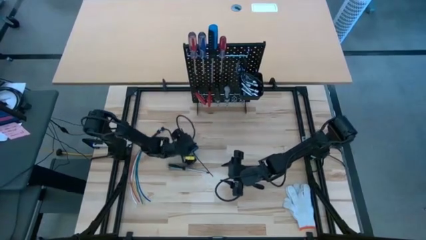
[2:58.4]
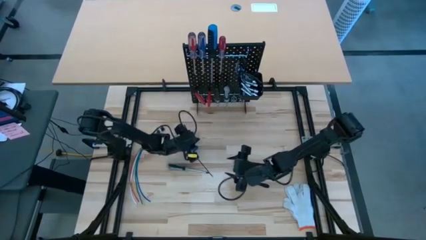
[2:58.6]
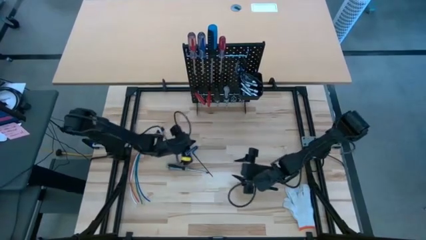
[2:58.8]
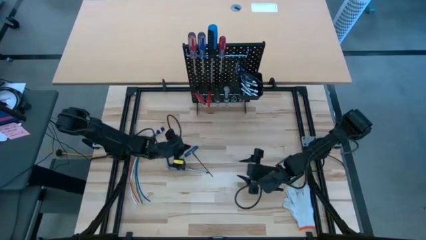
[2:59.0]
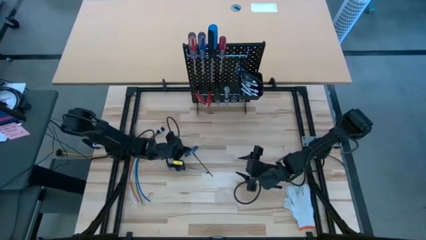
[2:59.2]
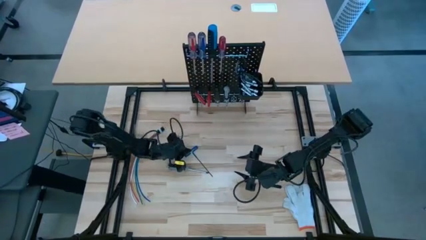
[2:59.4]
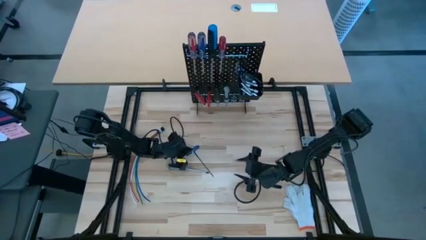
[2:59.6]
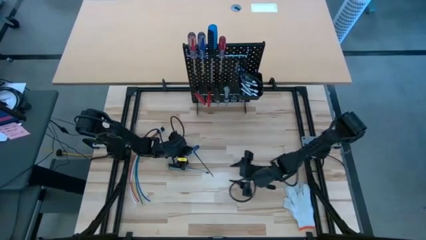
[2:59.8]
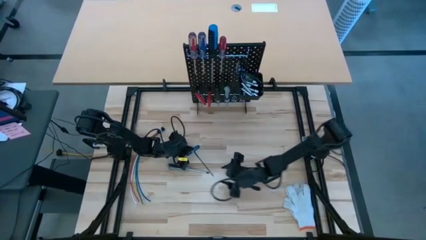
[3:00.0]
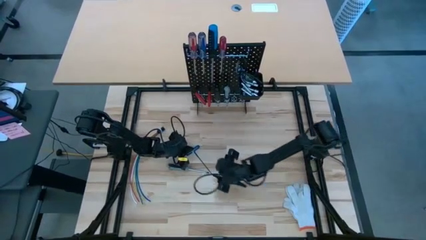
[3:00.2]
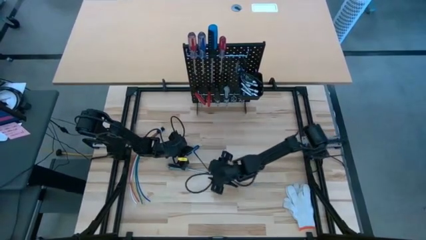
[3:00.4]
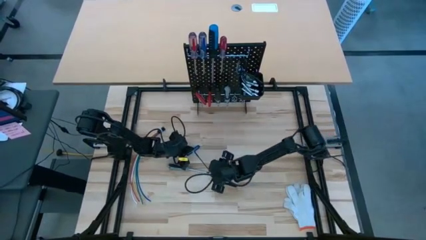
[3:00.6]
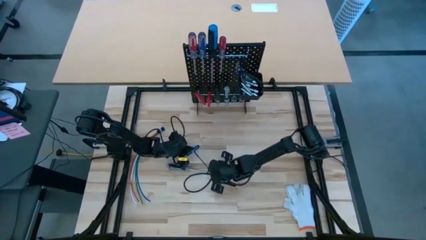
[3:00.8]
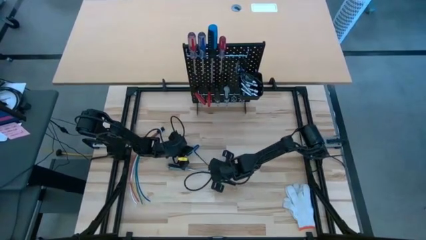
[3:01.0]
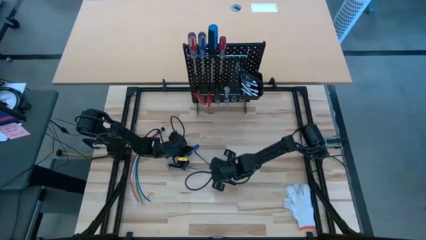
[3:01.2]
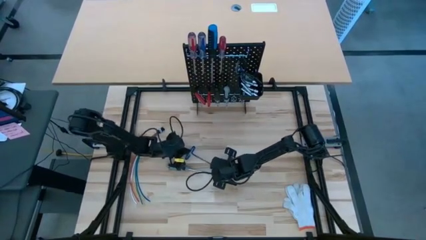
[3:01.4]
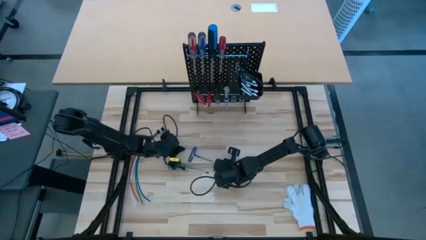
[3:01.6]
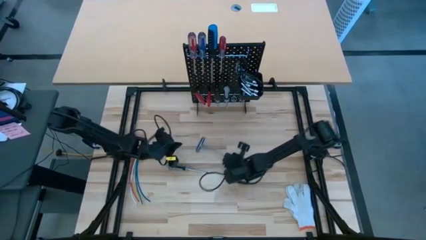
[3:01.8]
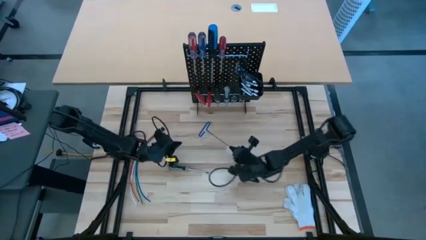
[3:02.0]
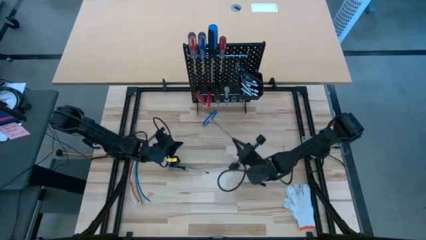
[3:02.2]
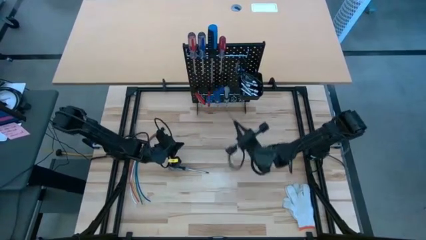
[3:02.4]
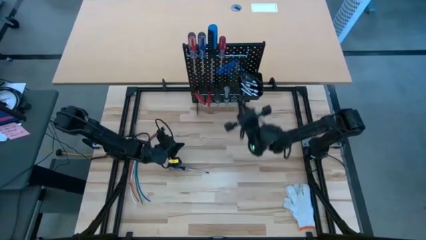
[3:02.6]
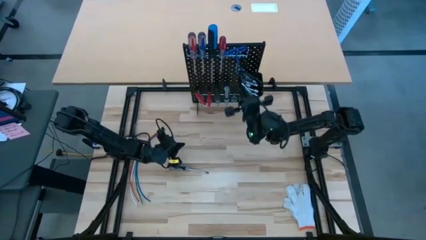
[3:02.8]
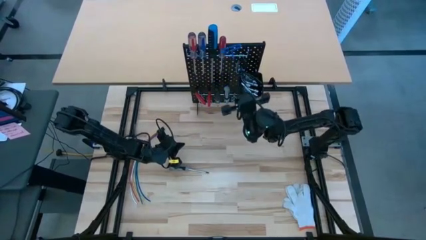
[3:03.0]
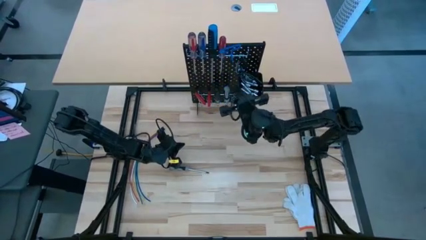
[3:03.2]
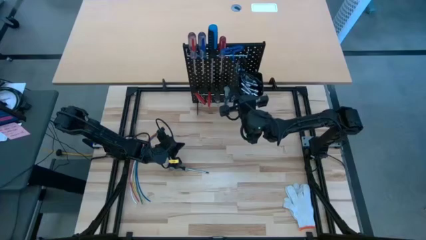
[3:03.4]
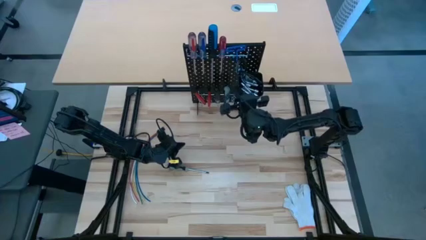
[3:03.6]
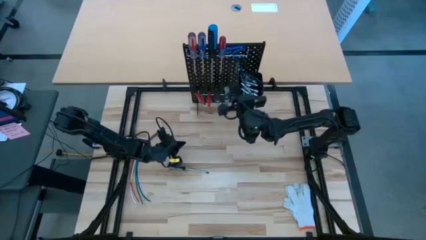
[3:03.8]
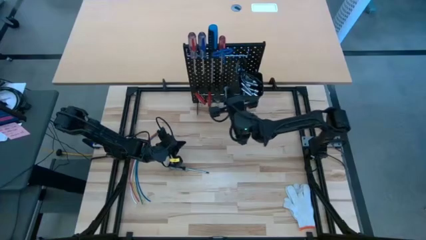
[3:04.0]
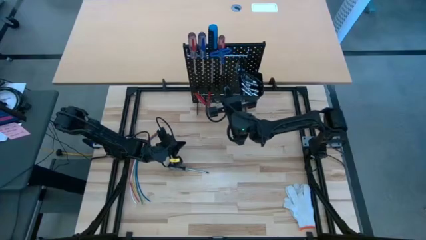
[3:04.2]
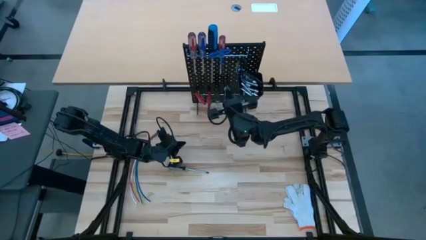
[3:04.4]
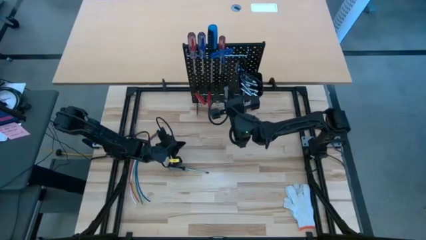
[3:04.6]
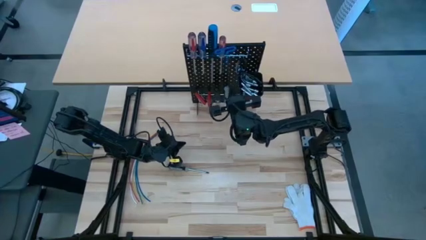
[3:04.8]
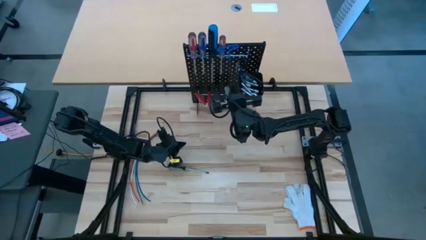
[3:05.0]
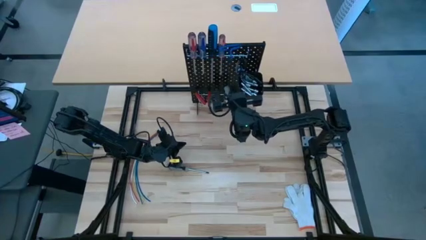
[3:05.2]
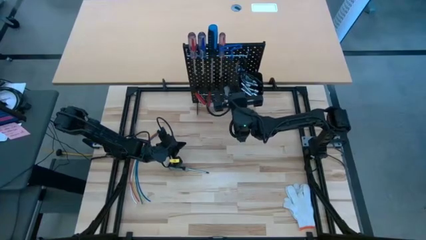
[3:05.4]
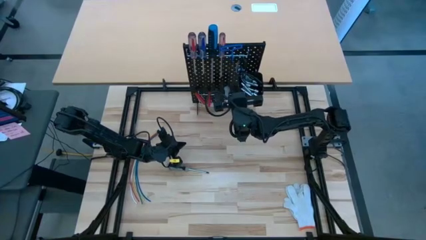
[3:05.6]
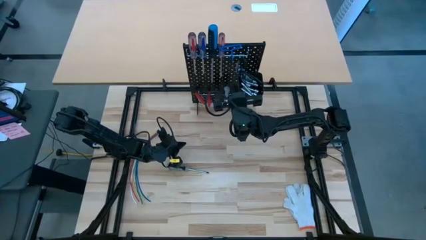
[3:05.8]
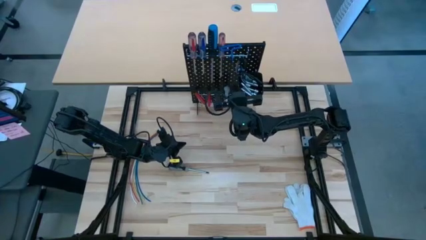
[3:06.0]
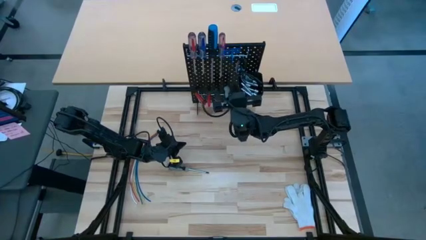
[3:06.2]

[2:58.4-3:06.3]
Task: Hang tools onto peg board
Hang the pick tool on the pegboard

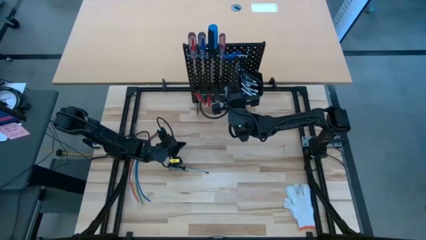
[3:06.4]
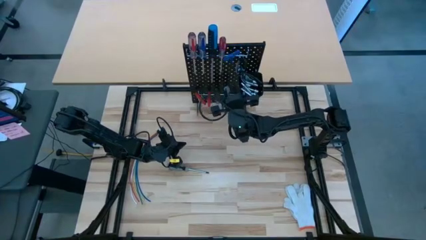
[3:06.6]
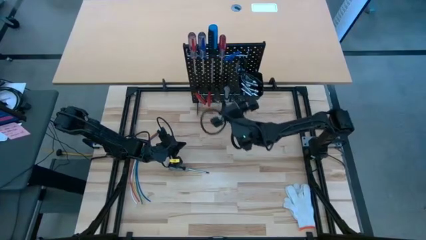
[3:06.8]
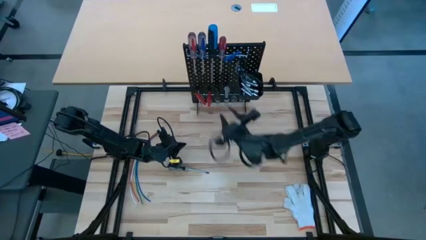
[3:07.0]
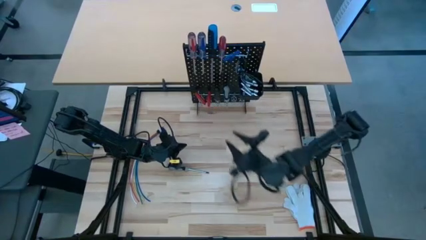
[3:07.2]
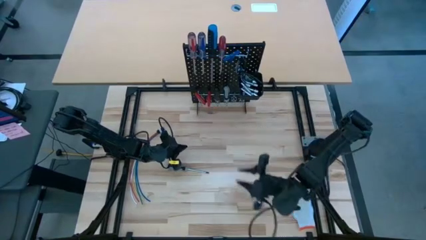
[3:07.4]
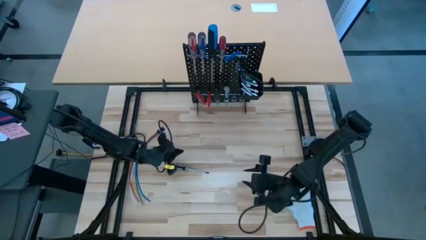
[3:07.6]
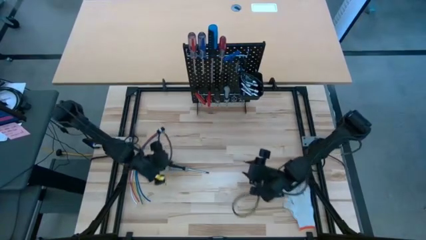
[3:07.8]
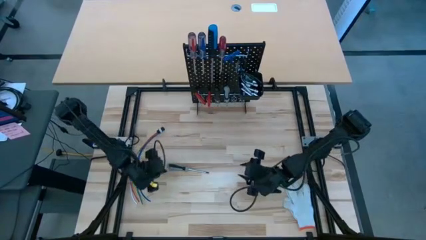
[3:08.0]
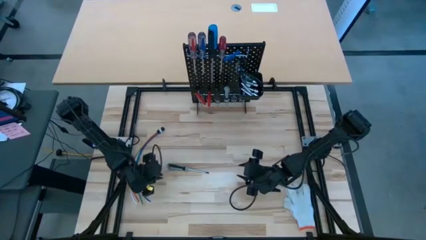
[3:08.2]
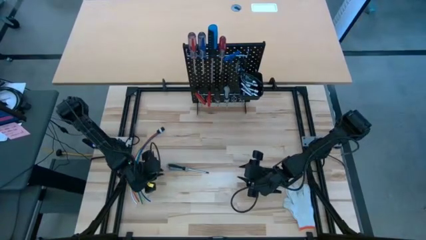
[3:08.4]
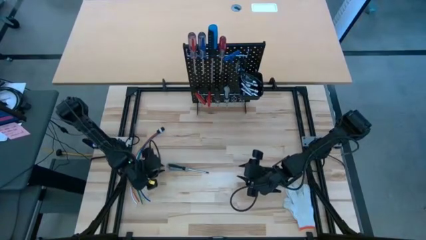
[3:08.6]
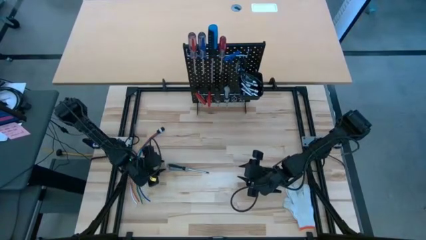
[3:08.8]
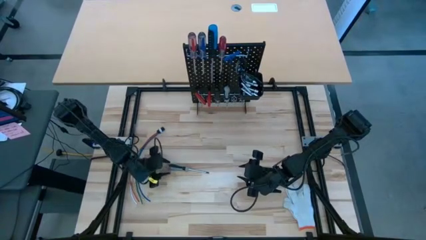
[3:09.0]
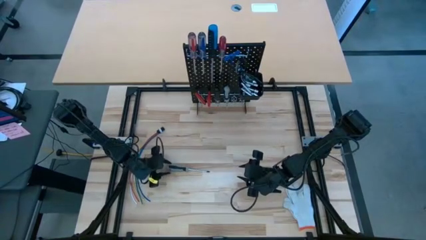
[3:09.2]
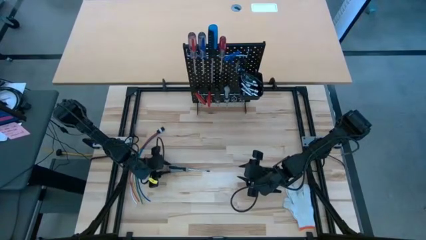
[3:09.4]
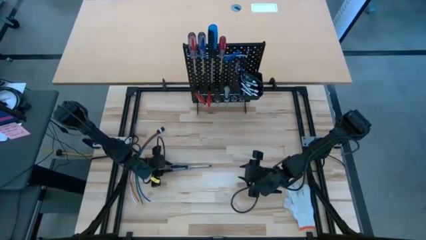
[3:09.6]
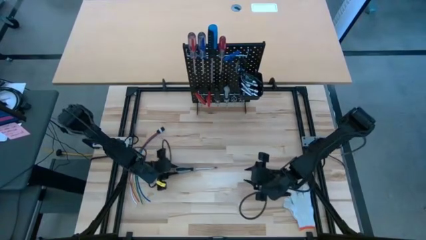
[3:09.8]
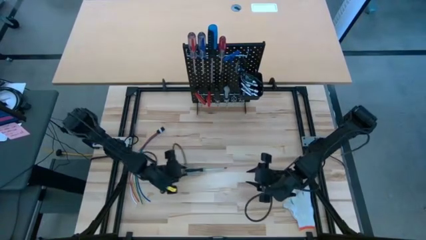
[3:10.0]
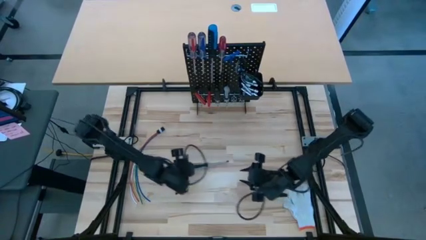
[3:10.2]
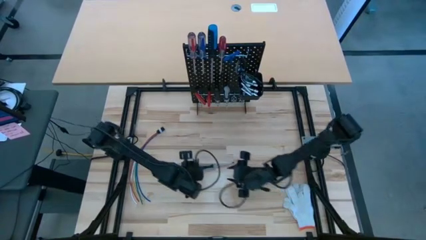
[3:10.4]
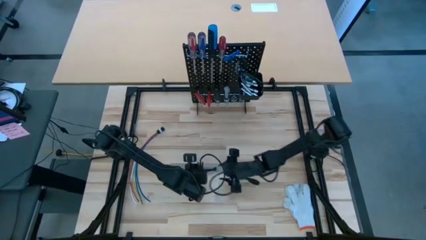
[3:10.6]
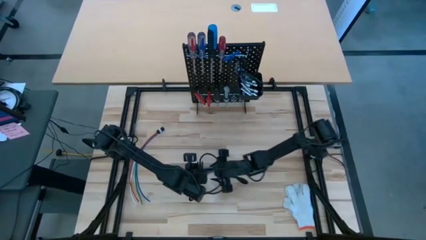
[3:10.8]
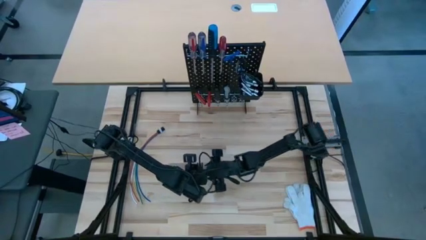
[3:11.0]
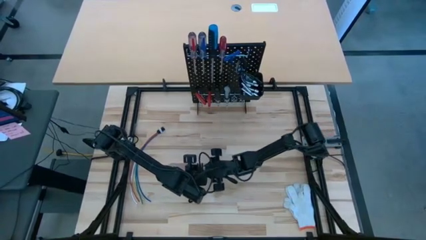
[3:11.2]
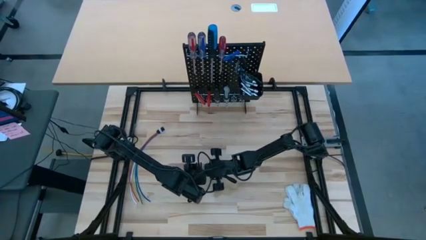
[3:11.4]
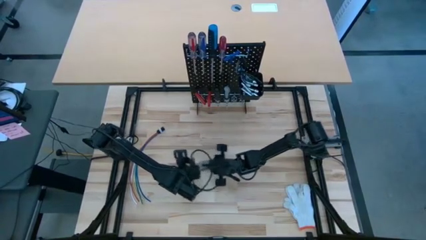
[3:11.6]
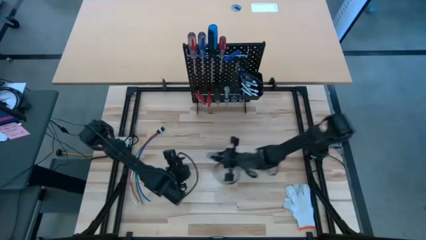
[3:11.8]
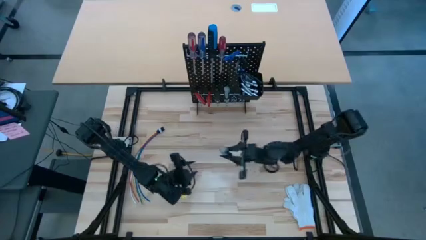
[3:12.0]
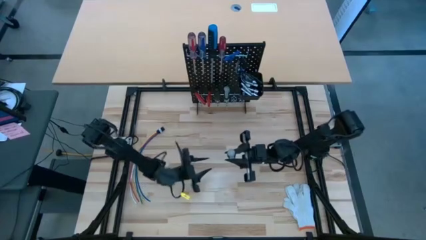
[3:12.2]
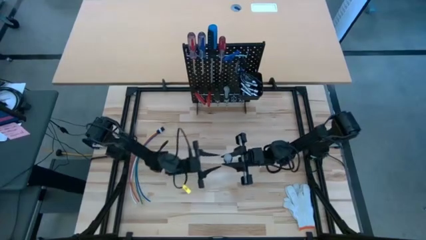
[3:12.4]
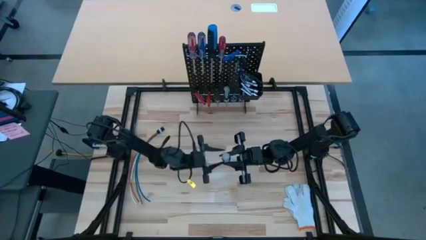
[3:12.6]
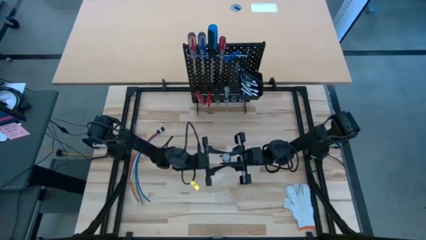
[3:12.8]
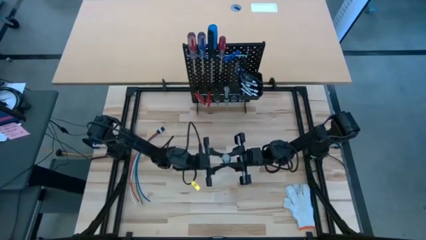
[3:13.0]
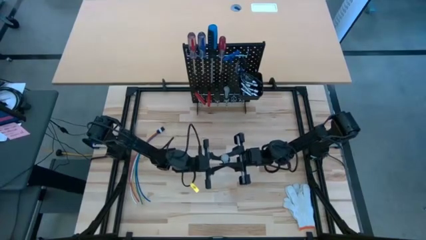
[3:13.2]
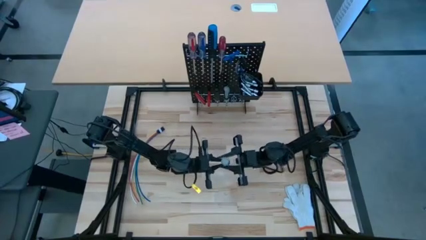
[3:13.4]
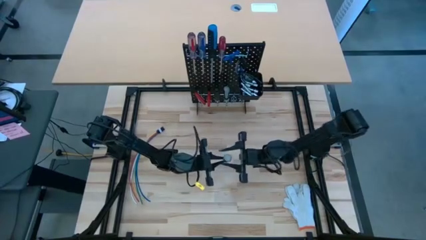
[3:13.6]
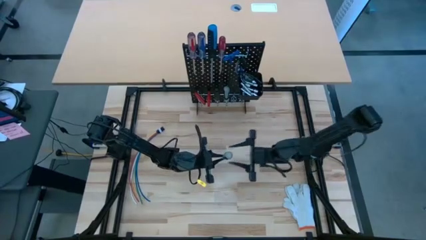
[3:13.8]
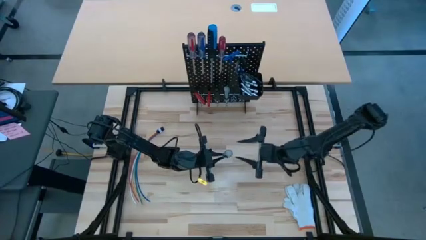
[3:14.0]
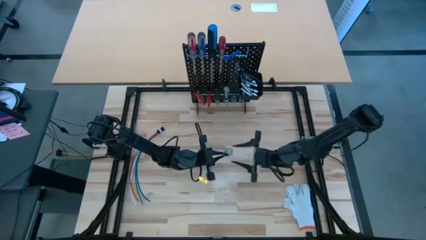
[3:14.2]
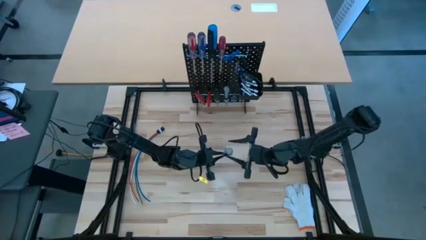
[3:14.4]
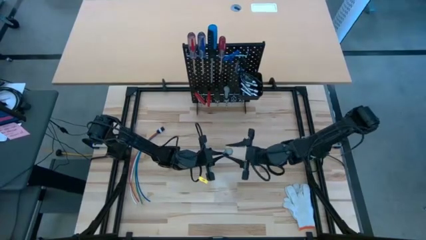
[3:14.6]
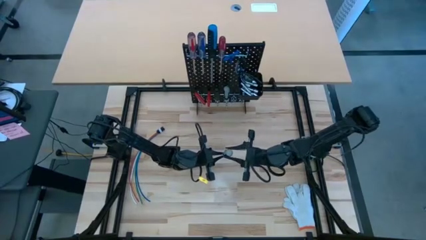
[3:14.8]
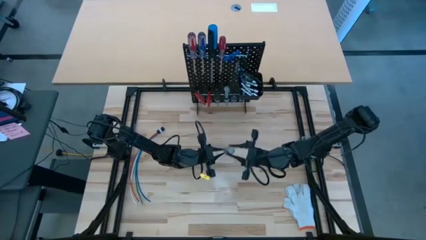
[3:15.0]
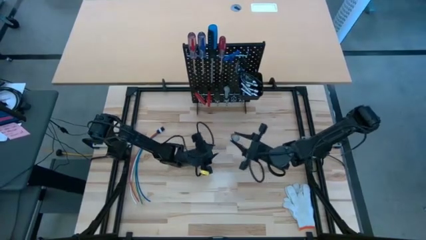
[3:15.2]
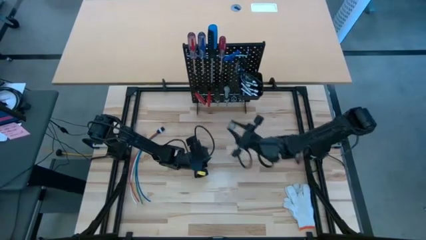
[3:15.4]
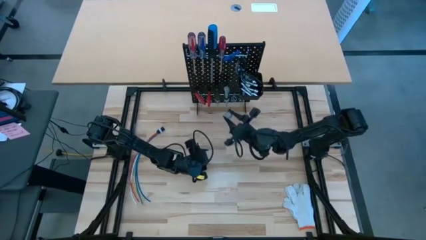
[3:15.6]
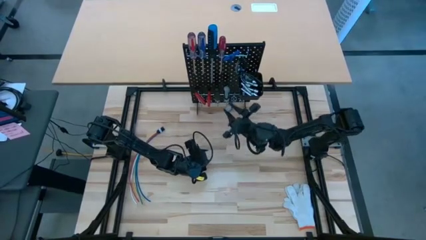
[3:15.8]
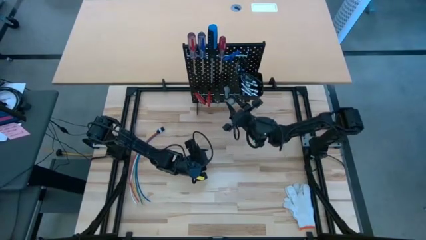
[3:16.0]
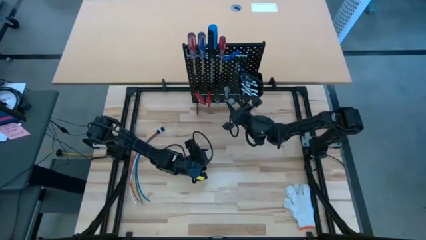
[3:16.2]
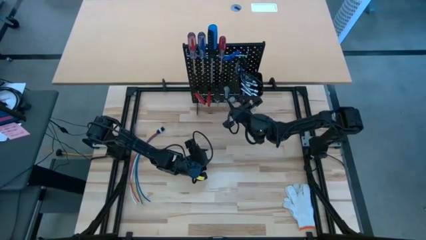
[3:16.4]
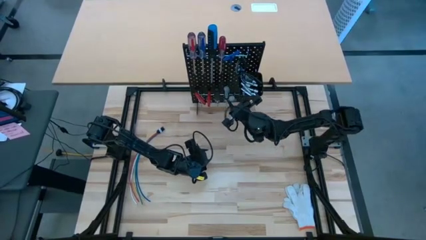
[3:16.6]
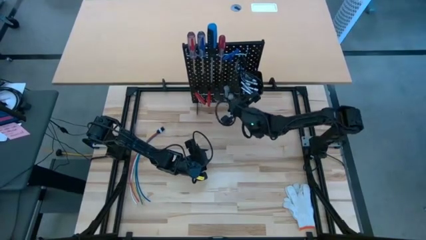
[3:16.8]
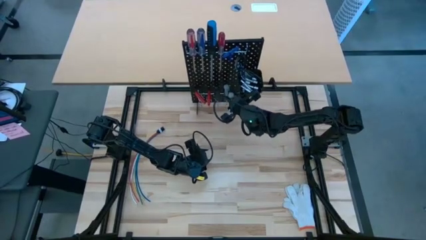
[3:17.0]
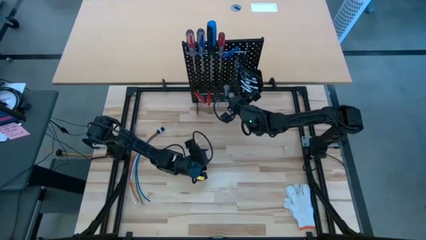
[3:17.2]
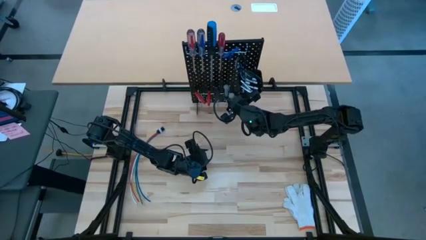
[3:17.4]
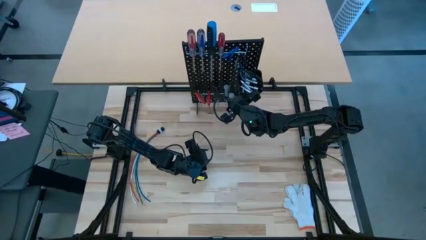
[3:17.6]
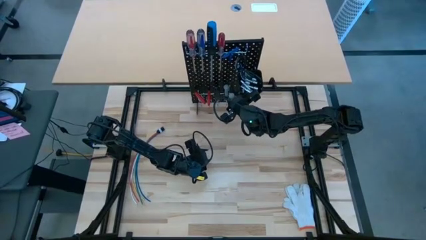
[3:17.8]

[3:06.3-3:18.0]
Hang the gray screwdriver on the pegboard
